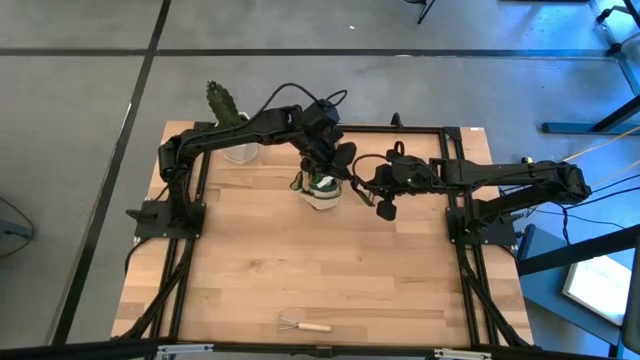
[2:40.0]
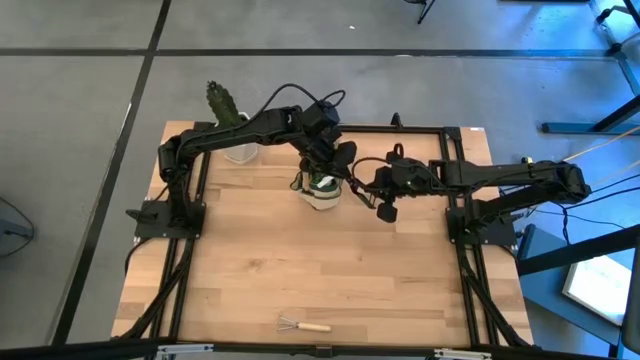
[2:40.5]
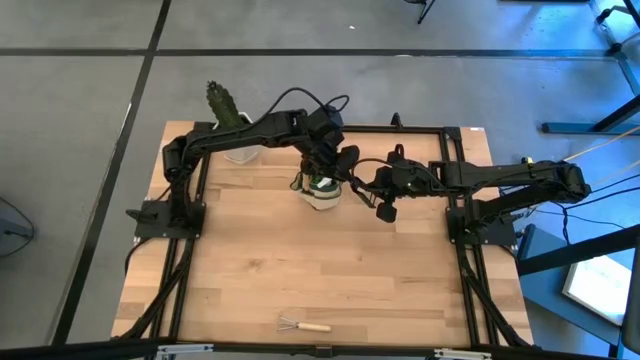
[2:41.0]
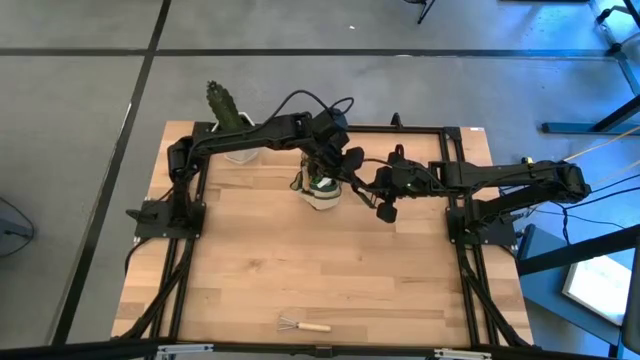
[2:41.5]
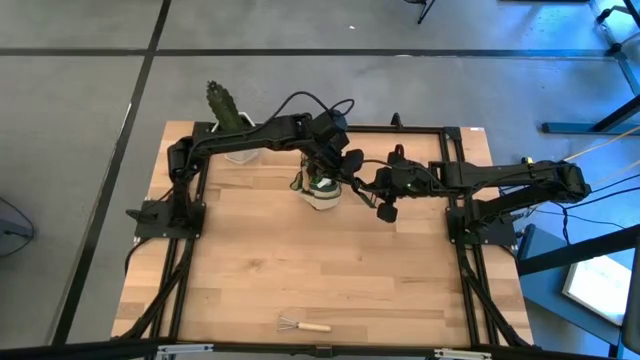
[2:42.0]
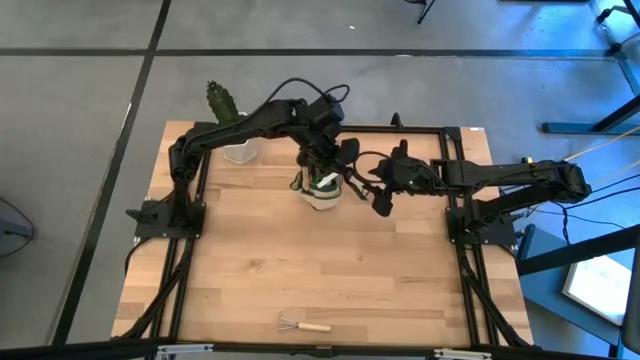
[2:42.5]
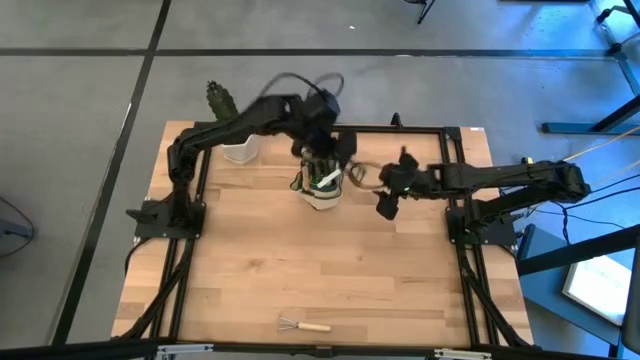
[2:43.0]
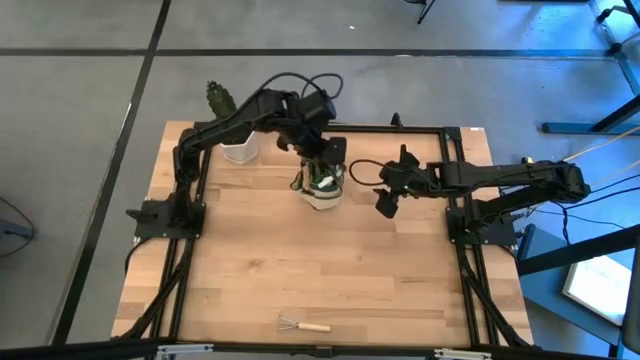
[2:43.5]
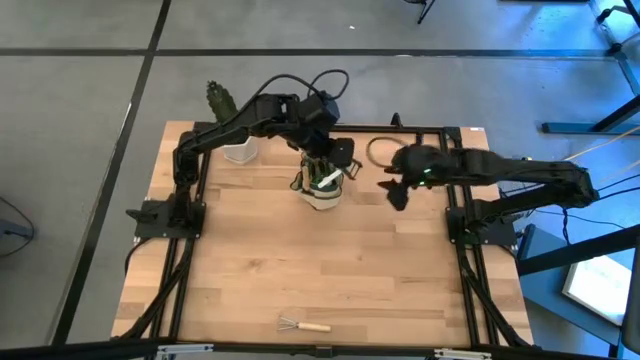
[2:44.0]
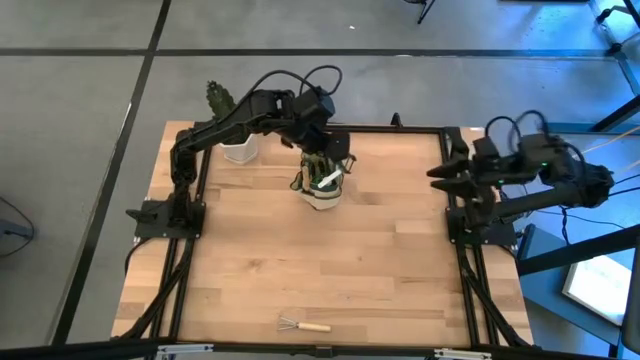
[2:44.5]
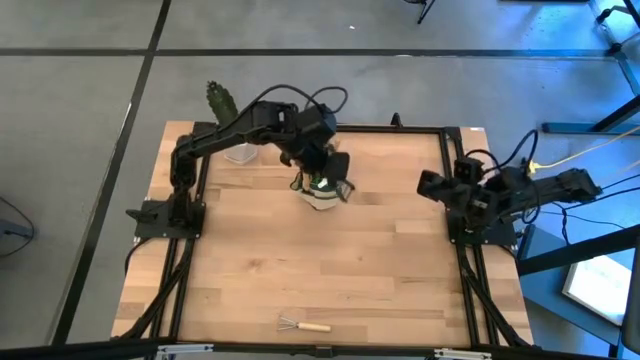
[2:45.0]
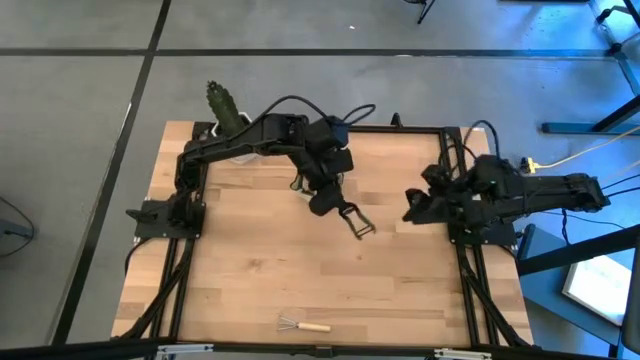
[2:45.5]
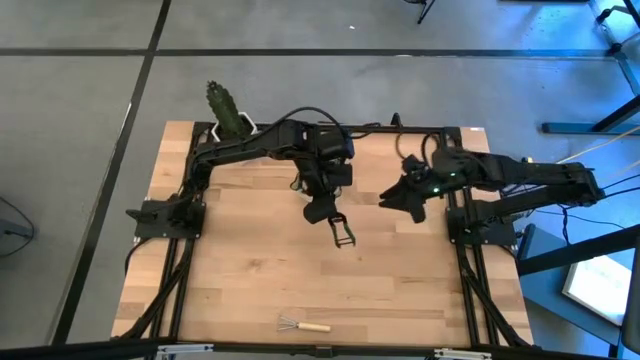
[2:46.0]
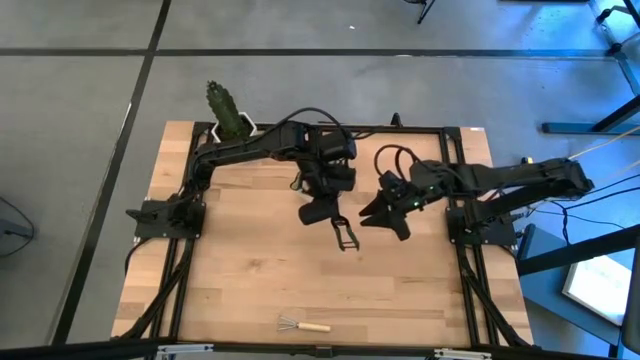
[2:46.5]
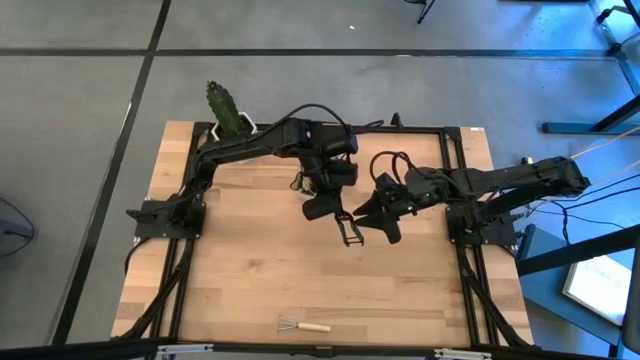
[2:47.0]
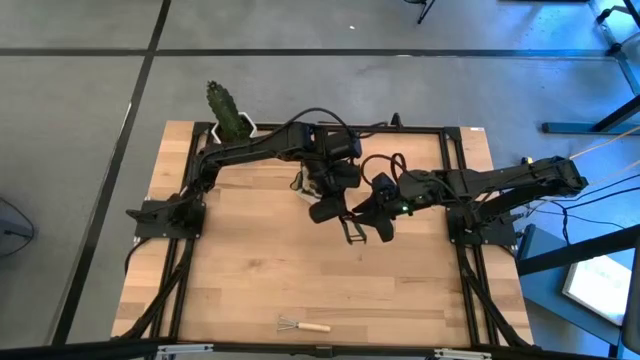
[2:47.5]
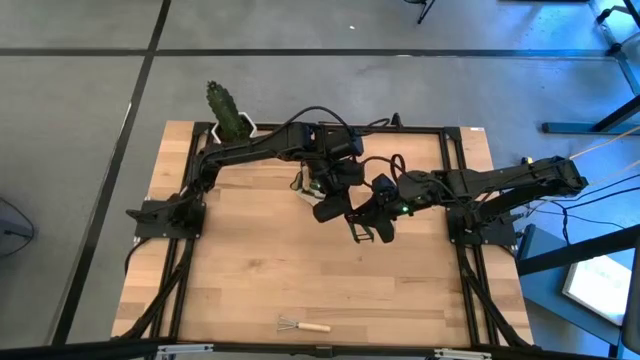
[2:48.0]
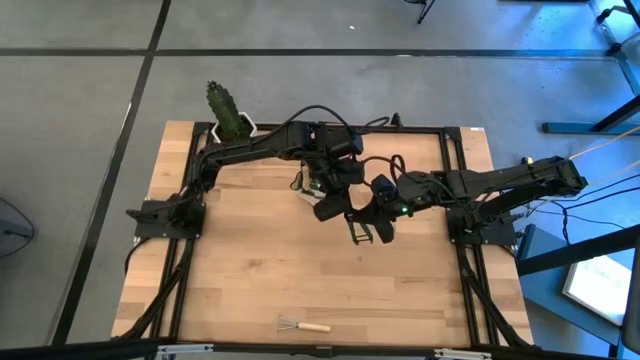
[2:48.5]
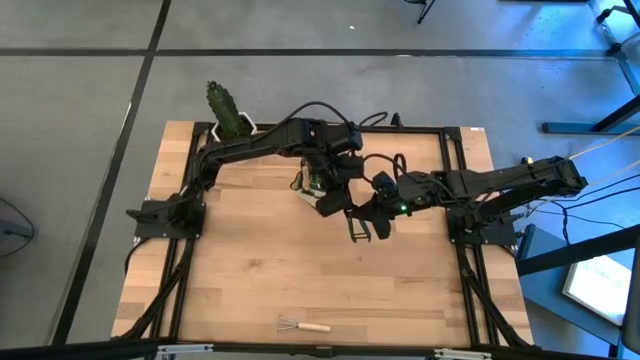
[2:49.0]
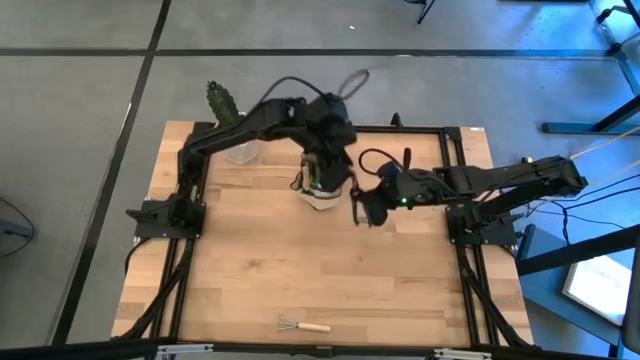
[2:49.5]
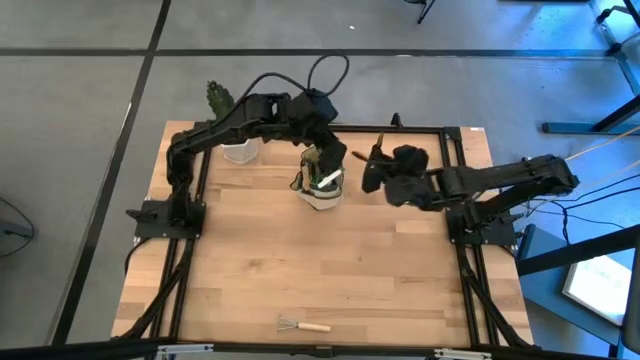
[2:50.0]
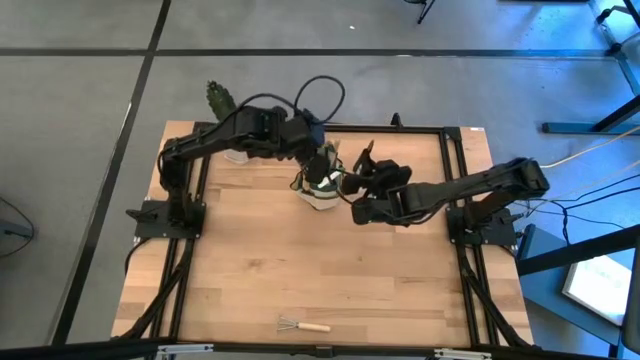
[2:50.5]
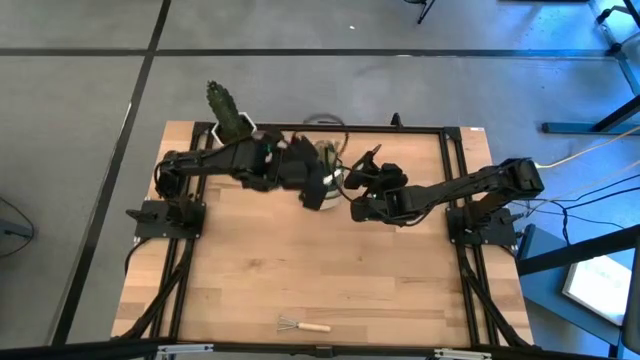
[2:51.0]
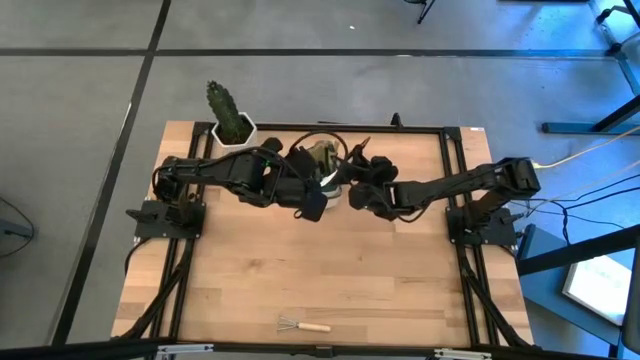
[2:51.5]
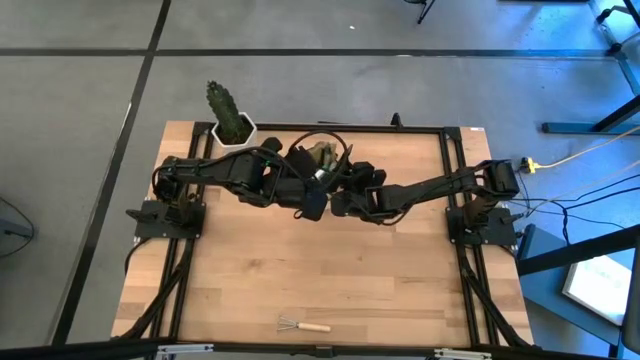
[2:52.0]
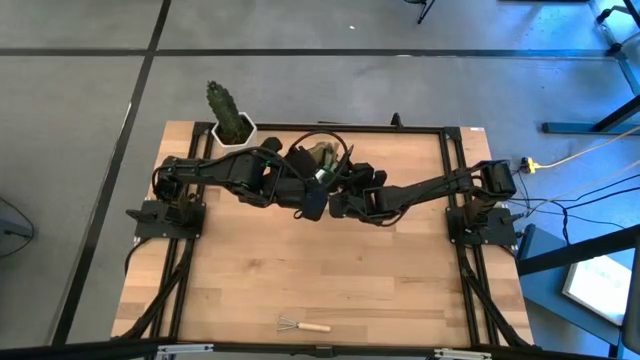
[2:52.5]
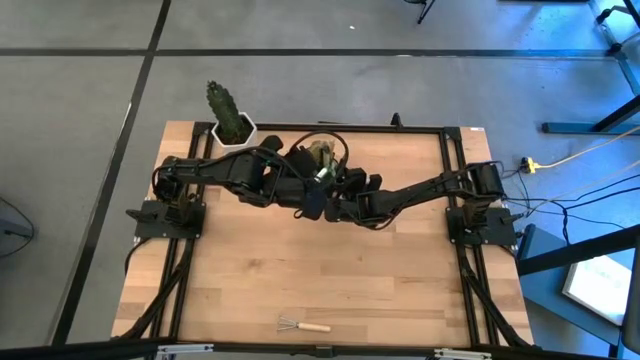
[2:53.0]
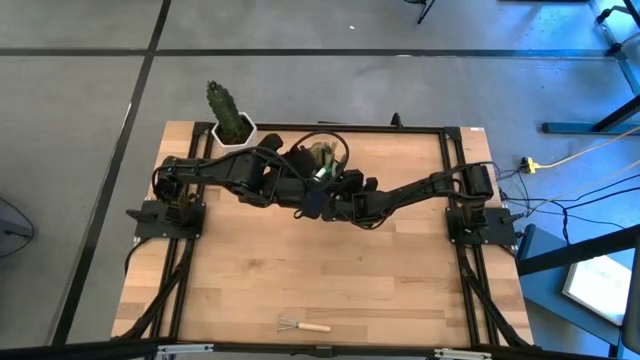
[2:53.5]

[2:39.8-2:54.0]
Task: Pick & Place Garden tools in Gardening bag
Put the fruit pruner into the gardening bag

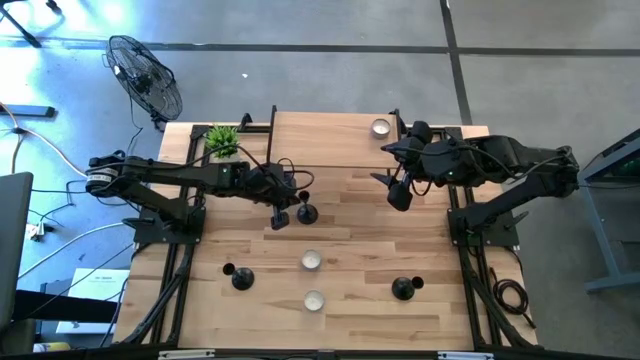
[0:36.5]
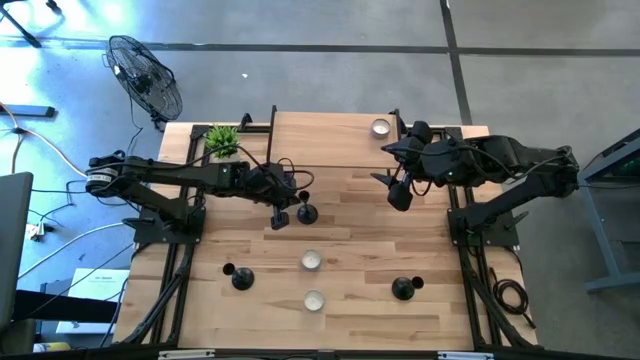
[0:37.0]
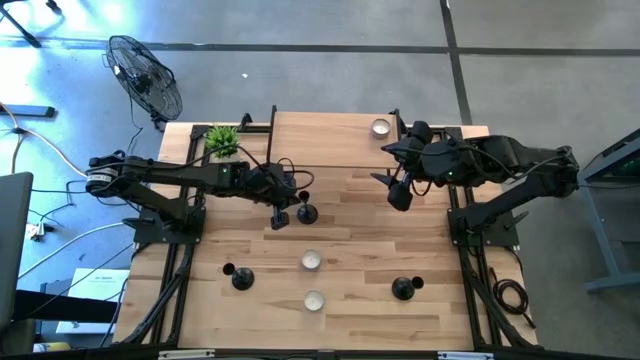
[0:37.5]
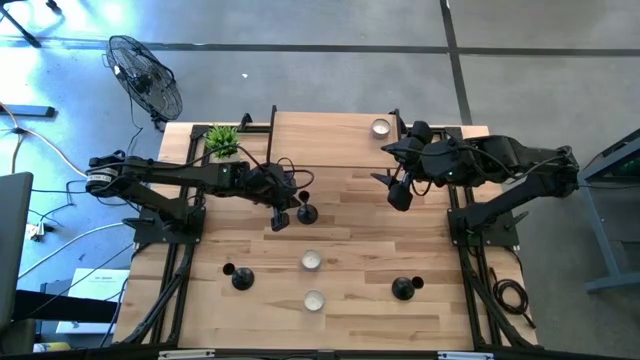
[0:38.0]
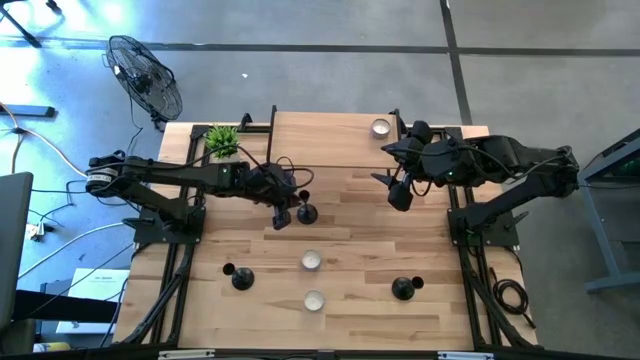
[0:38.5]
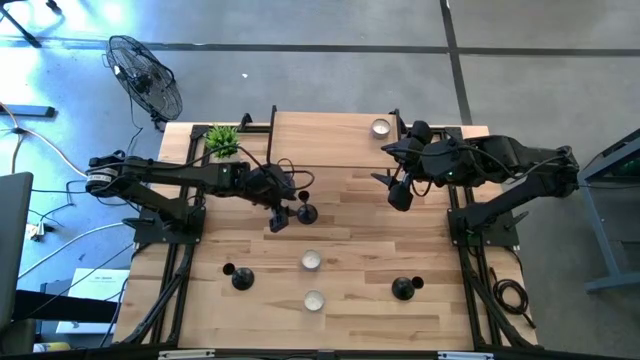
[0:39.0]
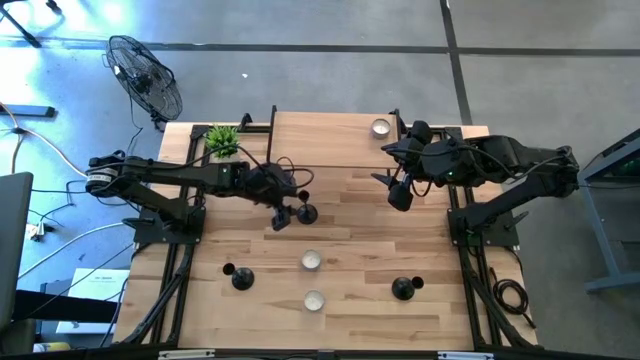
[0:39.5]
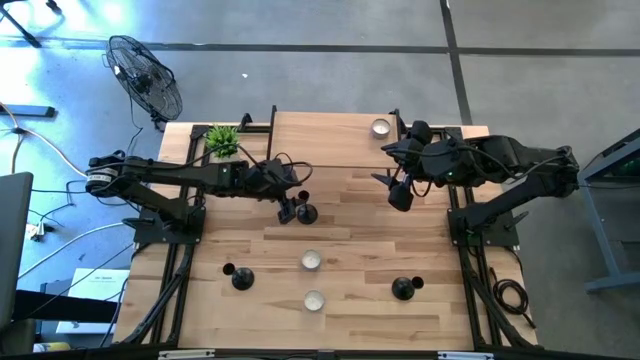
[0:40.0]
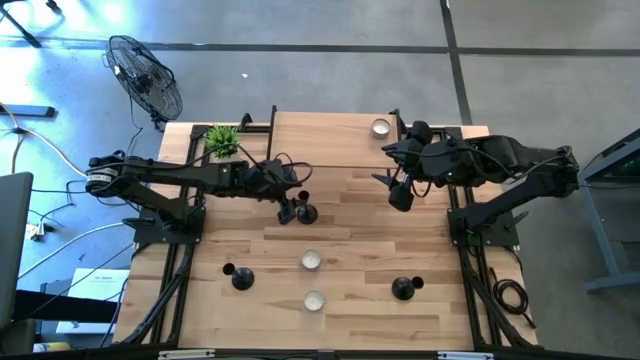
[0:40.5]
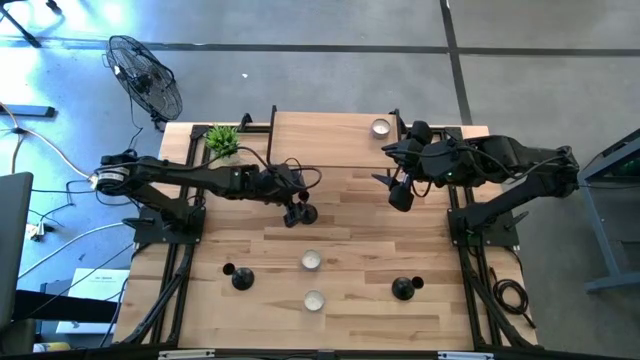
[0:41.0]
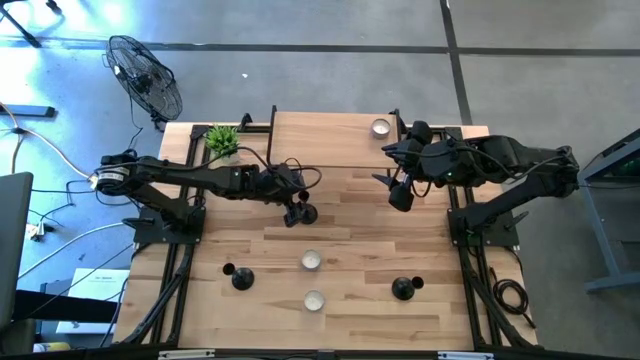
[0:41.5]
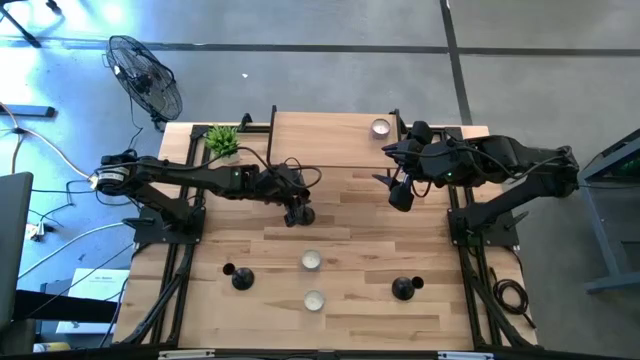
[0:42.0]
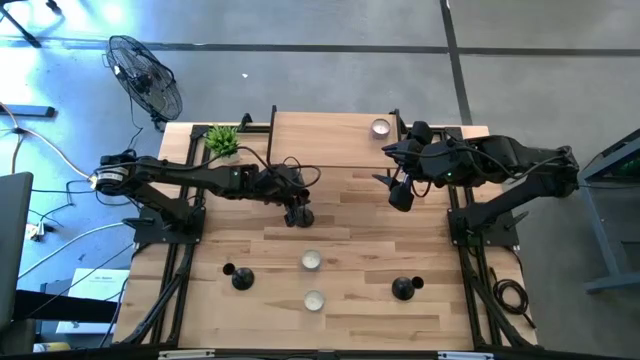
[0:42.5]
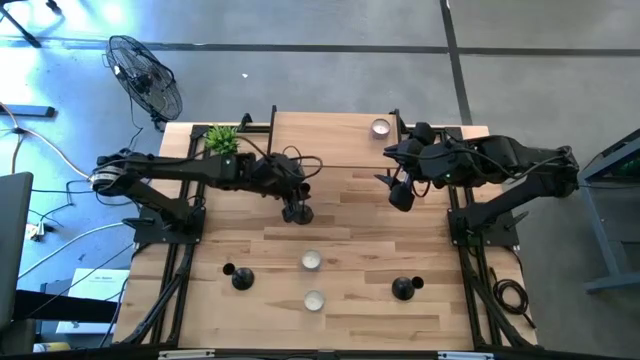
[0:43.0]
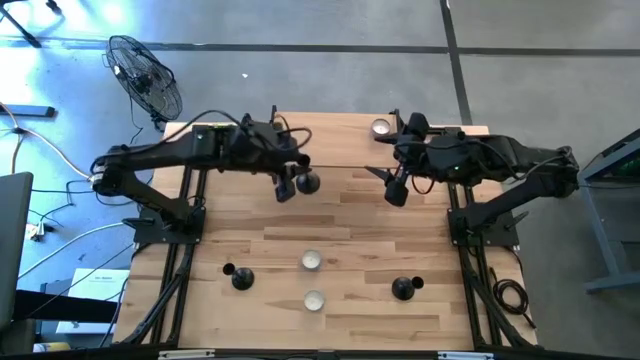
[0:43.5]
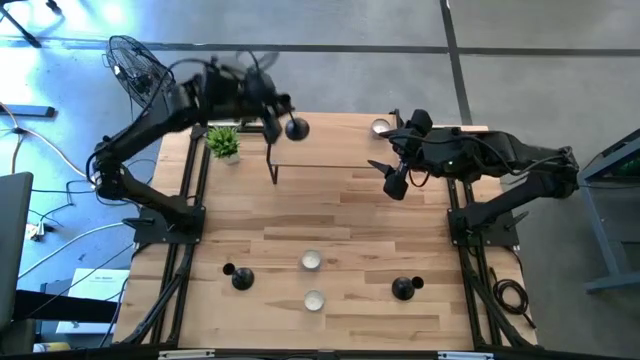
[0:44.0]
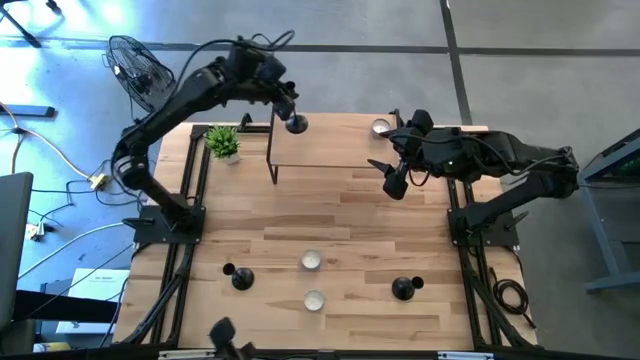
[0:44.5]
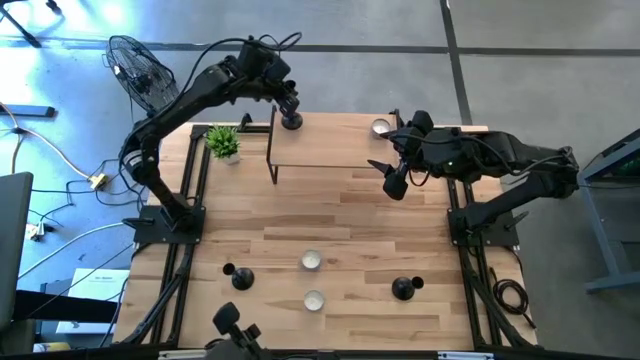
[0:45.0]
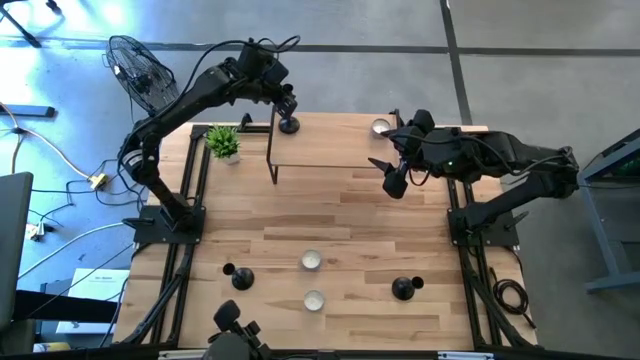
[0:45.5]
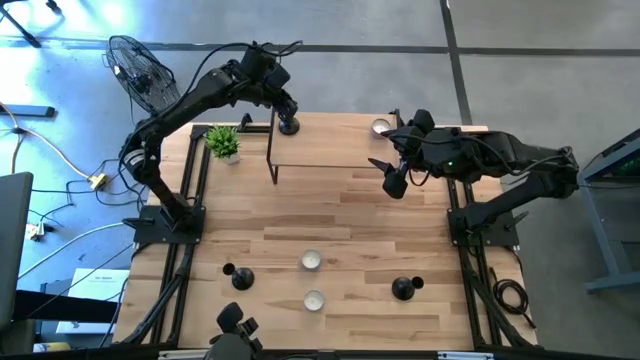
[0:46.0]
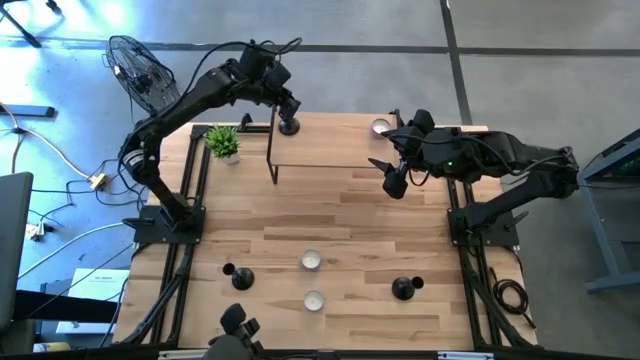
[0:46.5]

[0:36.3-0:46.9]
Task: Pick & Place candle stick holders
Put the top candle holder on the shelf
